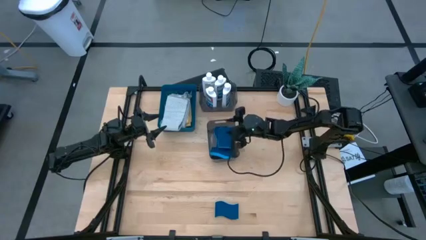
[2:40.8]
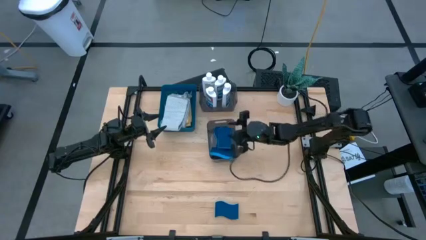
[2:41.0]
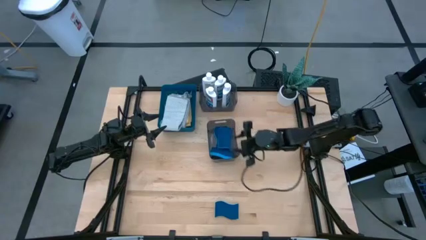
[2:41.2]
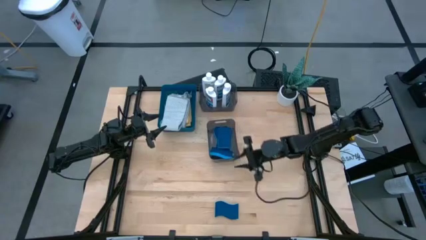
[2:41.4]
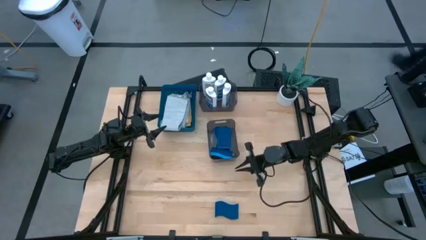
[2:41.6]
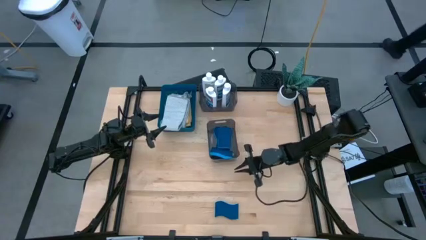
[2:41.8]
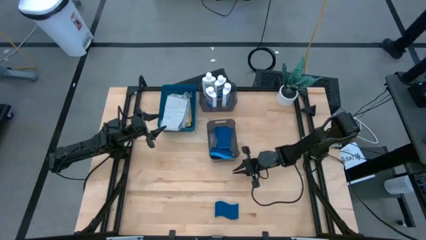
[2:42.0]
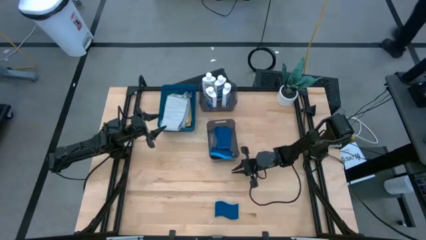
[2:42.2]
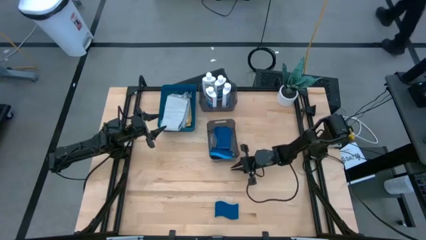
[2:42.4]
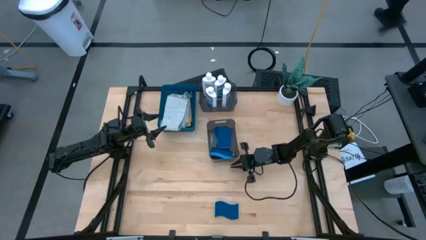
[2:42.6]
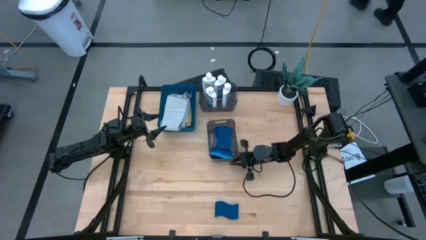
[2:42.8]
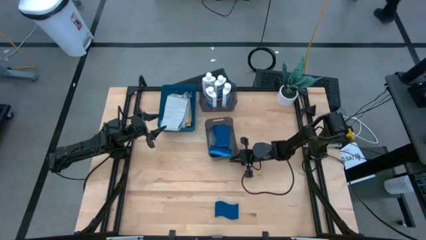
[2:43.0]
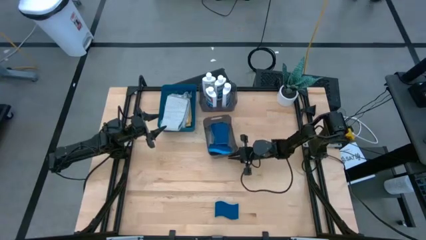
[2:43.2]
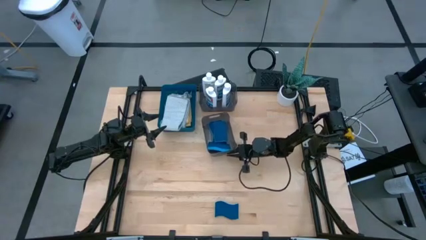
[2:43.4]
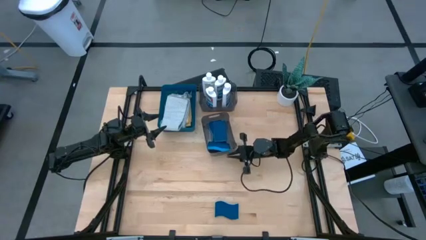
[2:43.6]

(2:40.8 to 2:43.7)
Task: Pick & Place Kitchen Items
Adjust the bottom black bin on the table

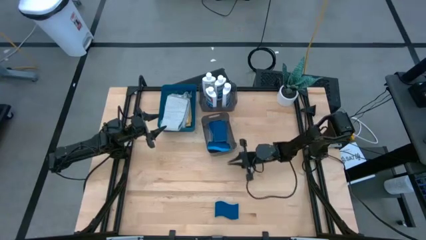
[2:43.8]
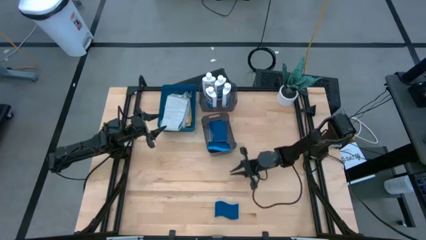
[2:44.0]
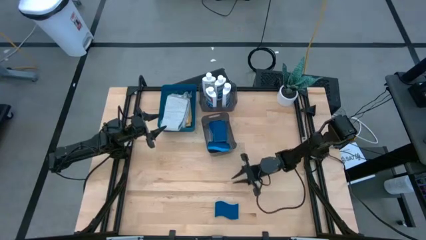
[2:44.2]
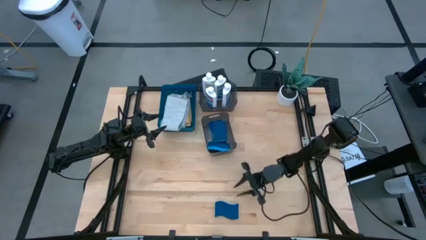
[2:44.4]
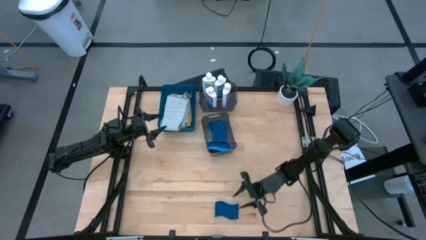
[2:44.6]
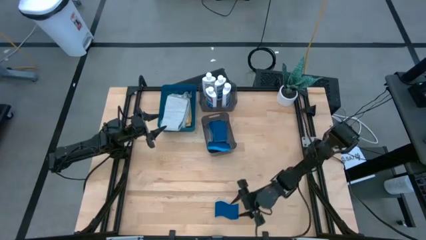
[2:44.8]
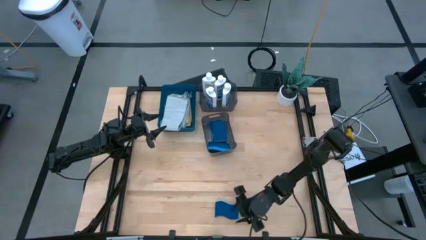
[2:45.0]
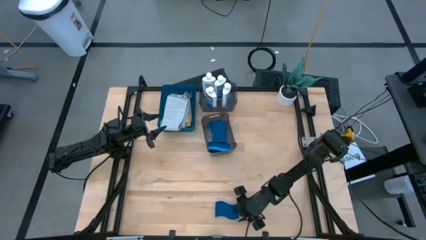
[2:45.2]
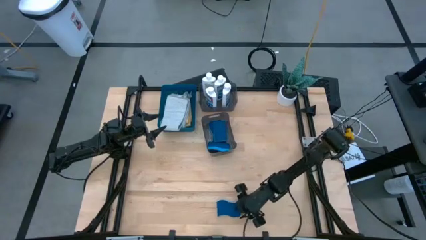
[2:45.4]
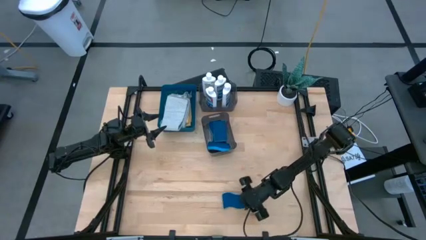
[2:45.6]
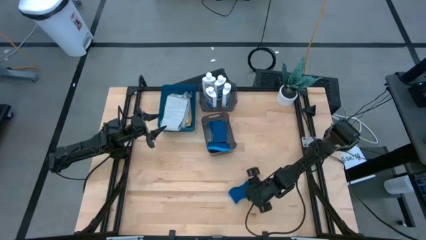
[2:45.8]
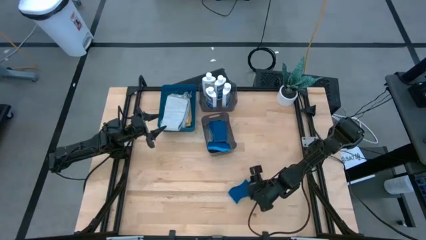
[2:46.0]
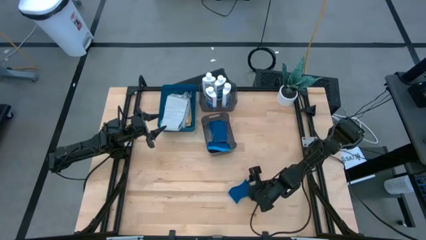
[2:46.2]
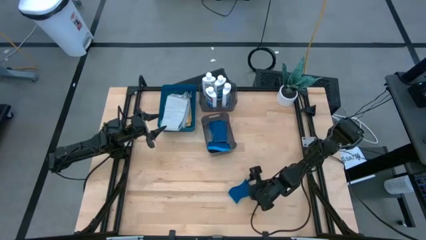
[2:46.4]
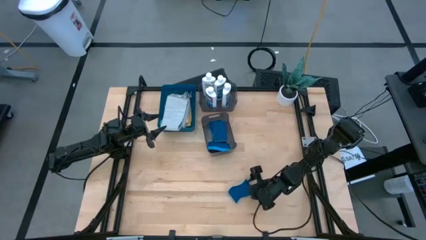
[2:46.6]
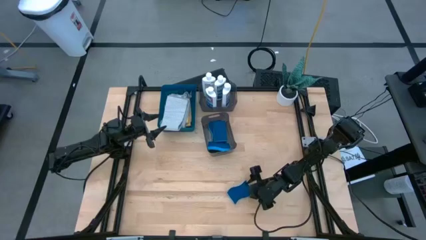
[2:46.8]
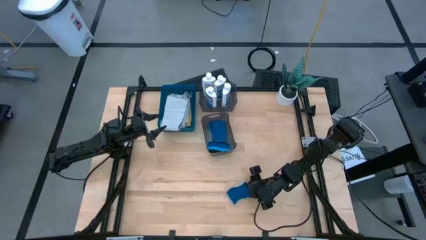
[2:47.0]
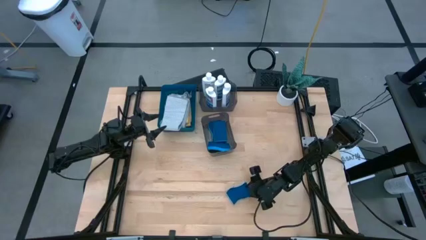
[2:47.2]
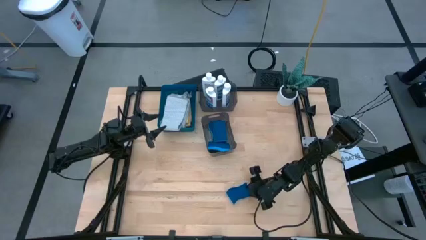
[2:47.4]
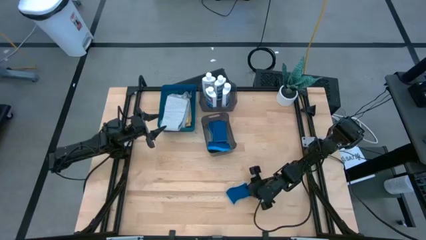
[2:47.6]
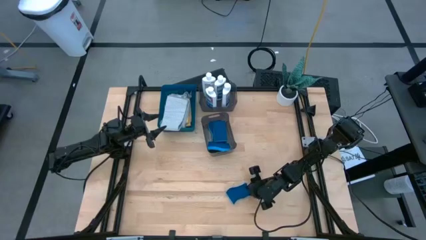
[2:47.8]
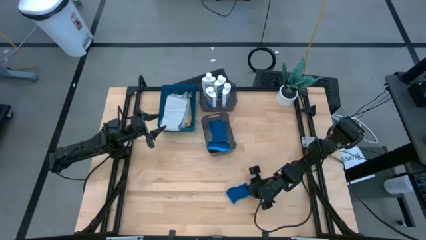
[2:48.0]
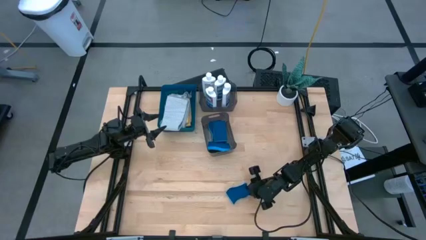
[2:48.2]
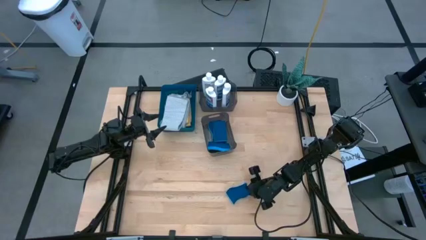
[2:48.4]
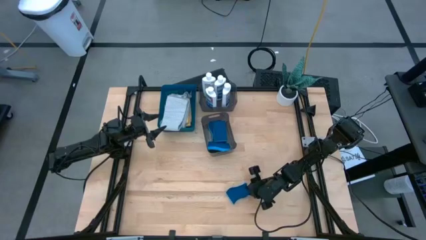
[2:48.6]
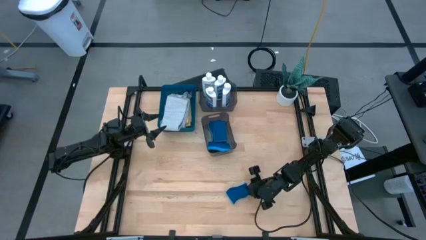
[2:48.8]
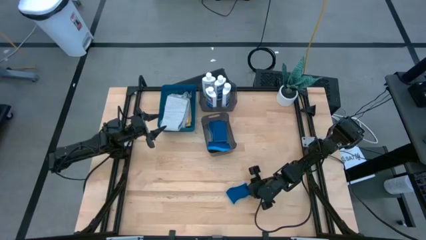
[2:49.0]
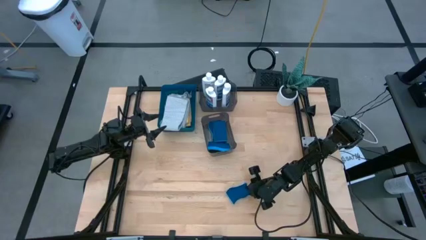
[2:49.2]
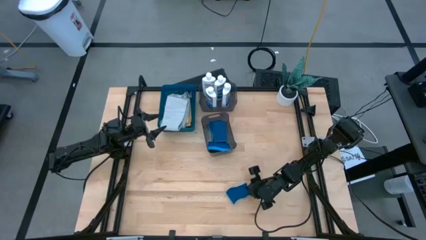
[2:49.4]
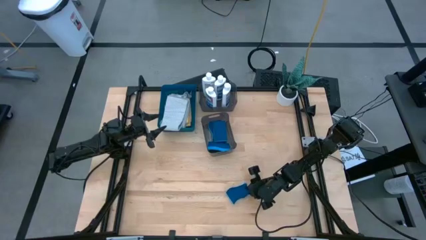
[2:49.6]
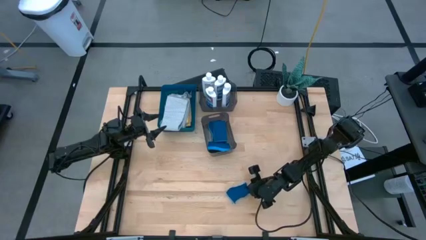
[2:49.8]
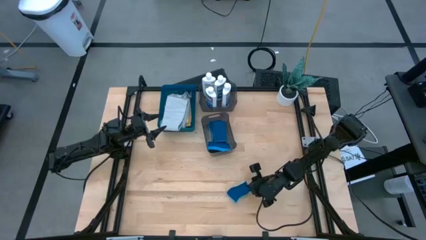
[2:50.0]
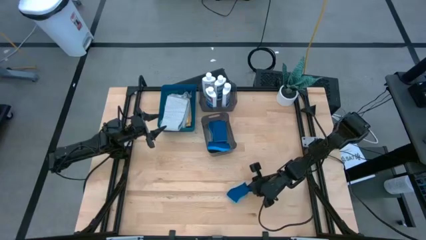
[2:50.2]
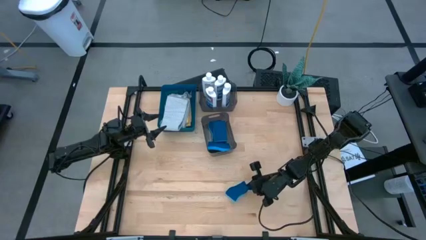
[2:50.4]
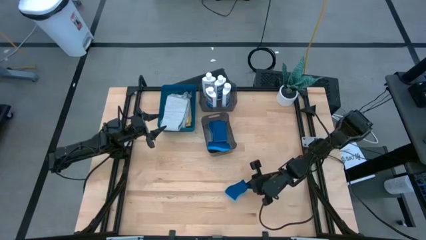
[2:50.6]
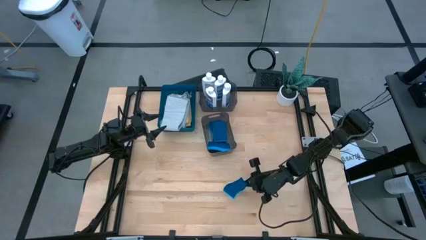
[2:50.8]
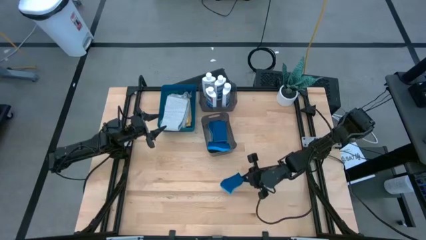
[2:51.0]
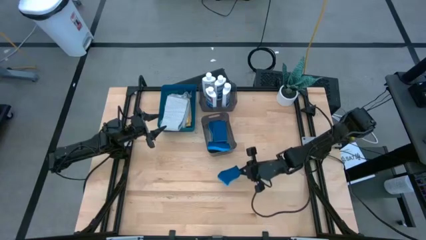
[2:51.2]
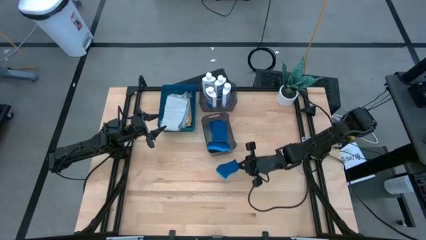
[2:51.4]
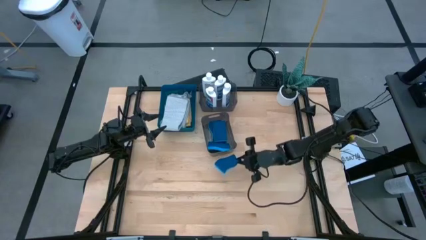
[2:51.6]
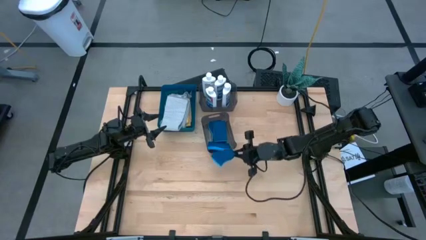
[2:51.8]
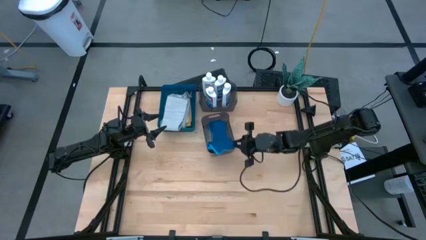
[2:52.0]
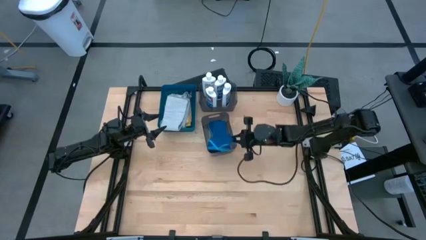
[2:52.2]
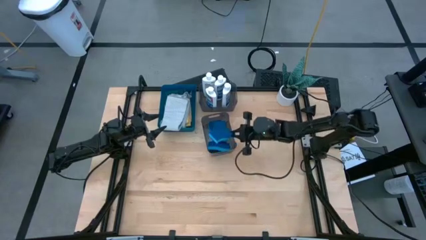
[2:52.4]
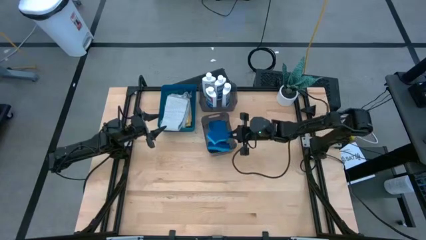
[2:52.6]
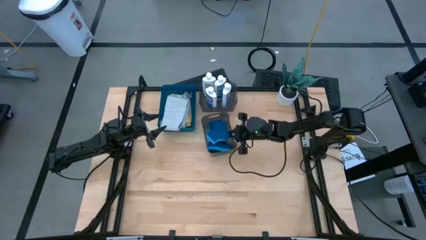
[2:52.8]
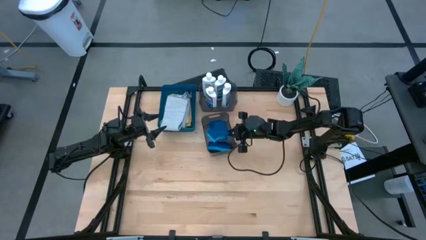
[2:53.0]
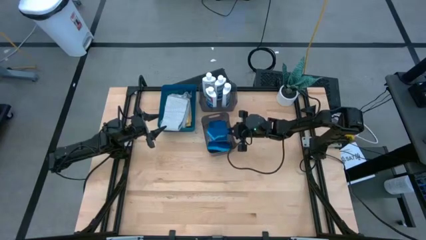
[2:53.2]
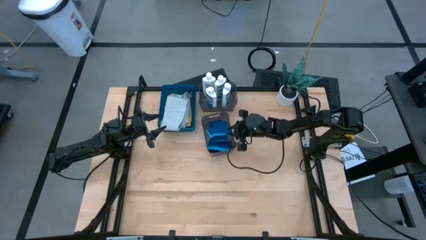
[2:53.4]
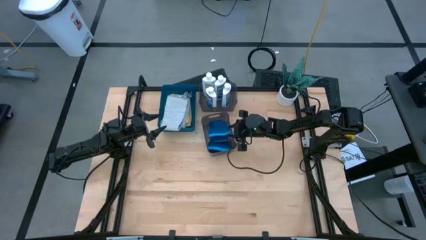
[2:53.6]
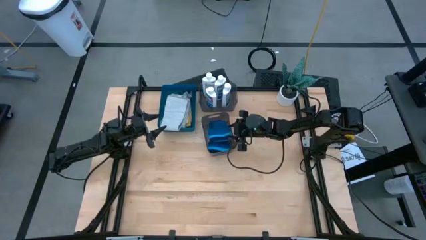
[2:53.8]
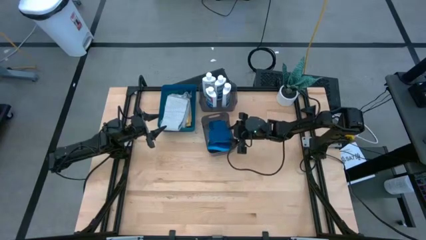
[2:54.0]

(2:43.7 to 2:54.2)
Put the blue sponge into the bottom black bin

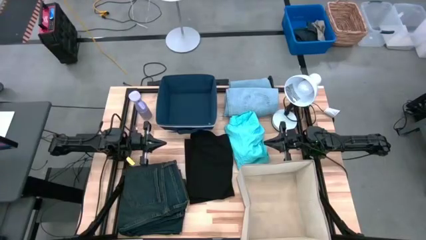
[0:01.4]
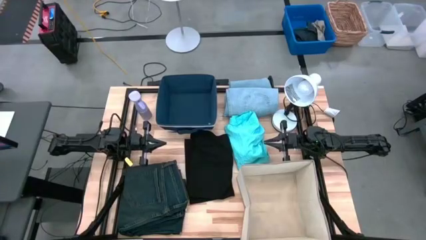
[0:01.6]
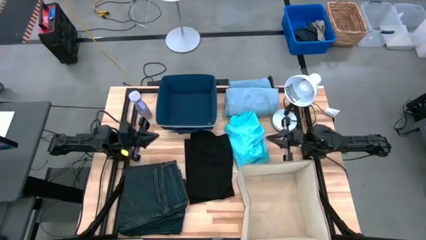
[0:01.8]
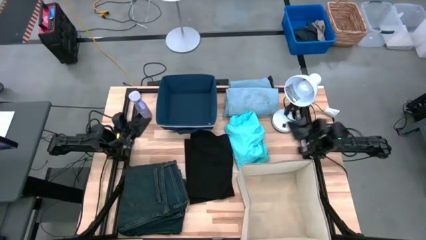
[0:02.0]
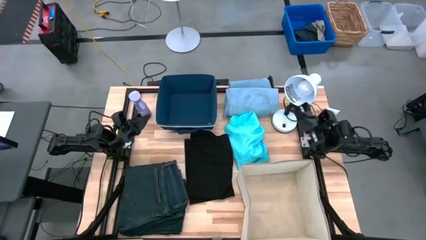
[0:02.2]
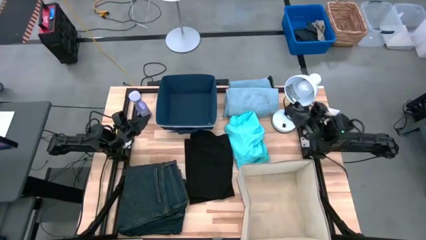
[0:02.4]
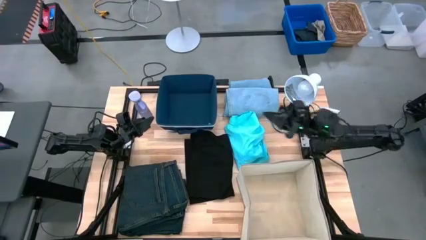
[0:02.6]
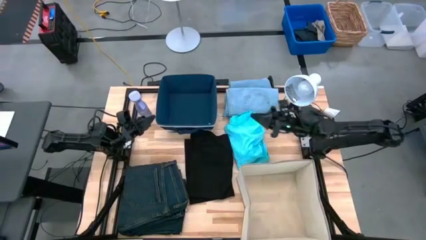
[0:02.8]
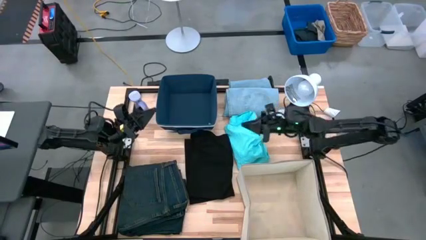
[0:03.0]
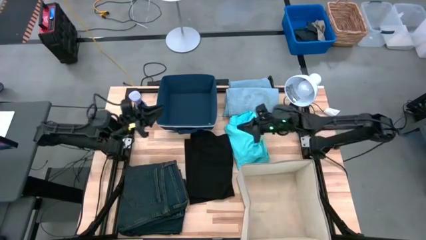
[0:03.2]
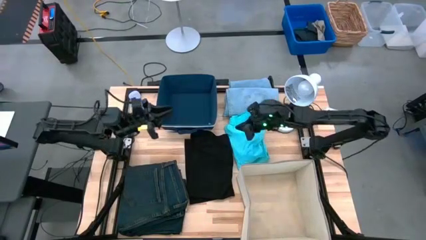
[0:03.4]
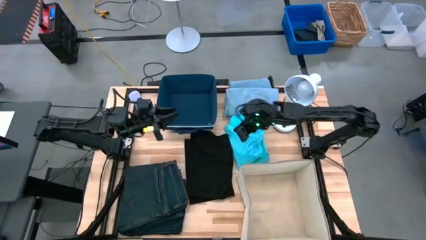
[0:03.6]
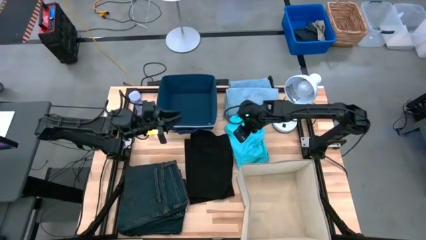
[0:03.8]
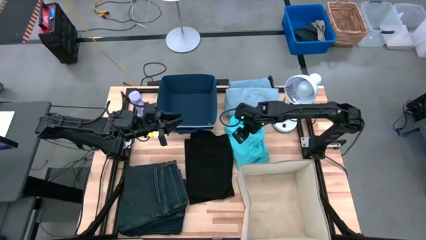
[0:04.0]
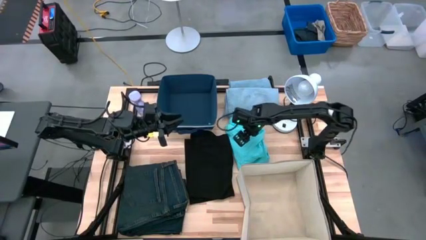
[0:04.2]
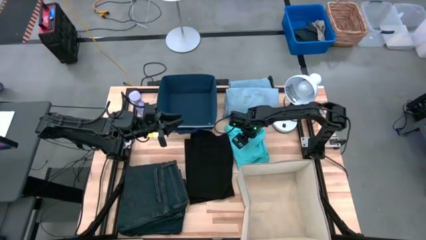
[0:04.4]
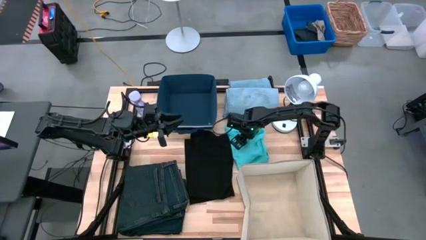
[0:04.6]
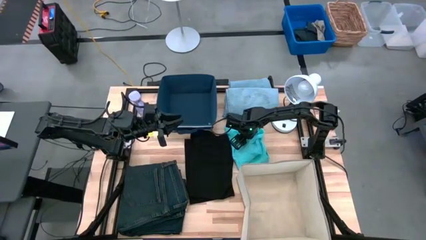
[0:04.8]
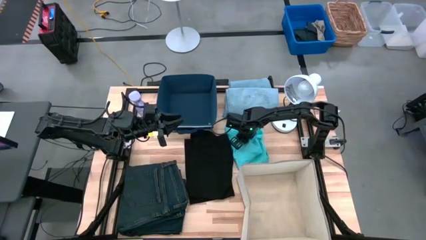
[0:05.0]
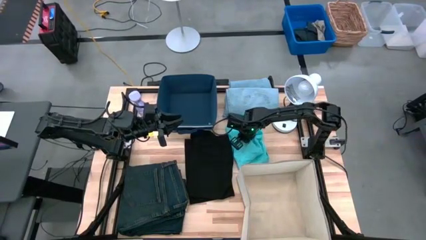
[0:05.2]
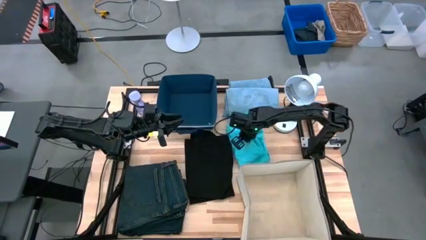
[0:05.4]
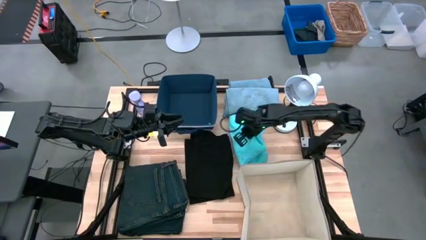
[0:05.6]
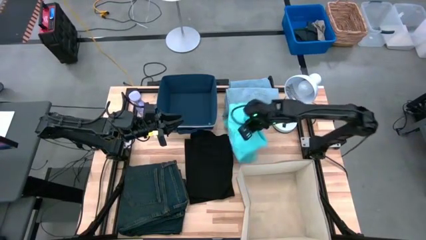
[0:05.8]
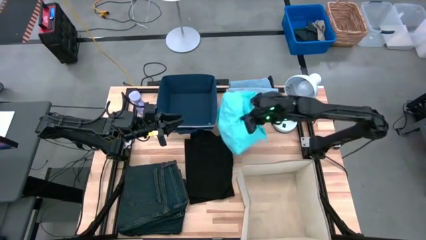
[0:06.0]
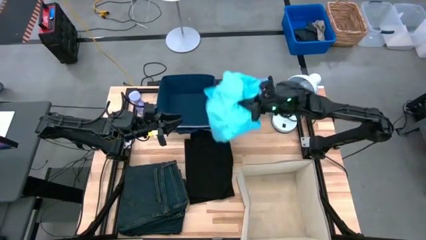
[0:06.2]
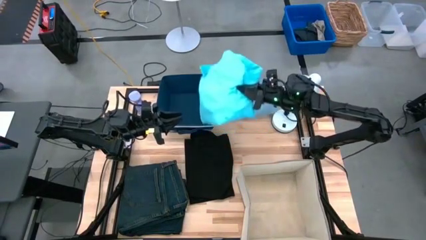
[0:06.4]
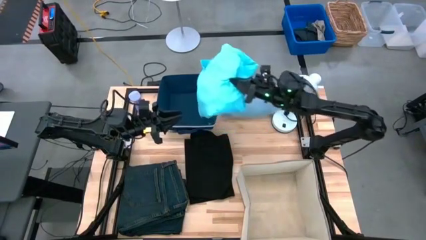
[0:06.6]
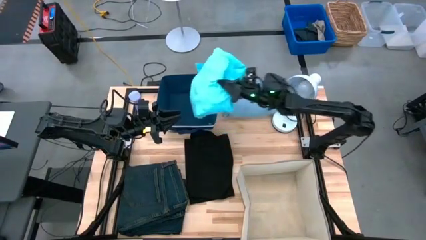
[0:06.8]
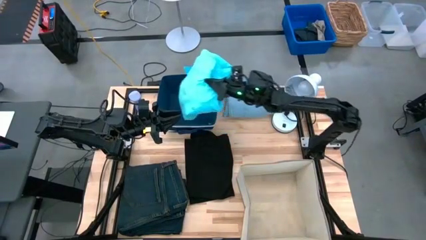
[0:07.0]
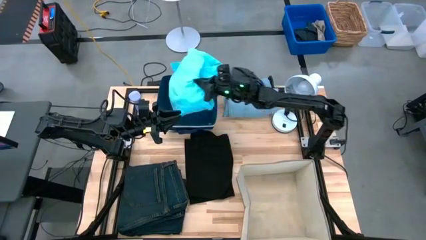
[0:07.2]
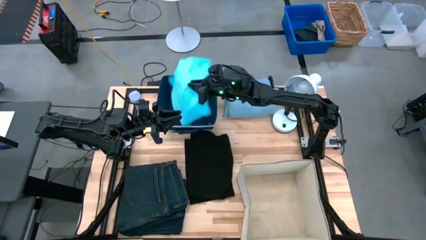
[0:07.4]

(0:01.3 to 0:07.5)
Task: Sort clothes
Put the light blue shirt into the blue bin
